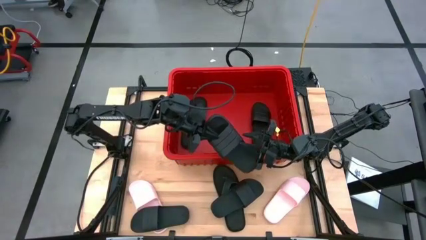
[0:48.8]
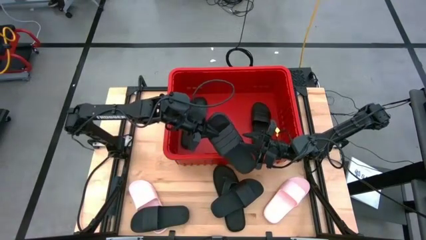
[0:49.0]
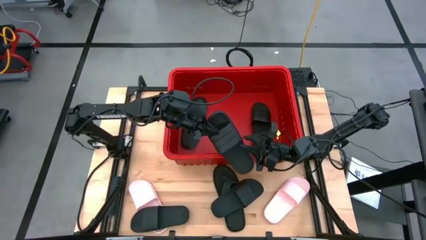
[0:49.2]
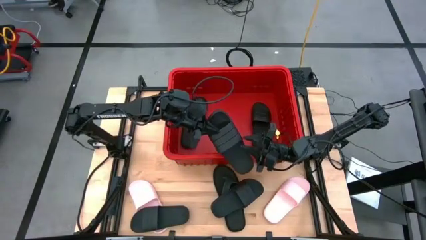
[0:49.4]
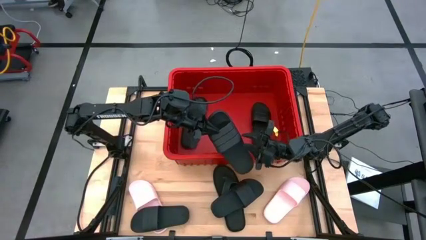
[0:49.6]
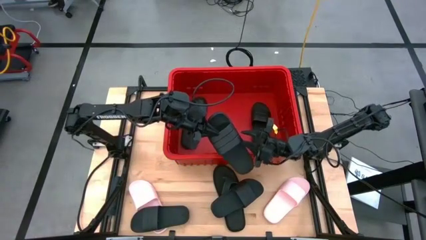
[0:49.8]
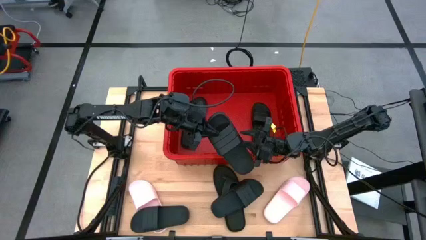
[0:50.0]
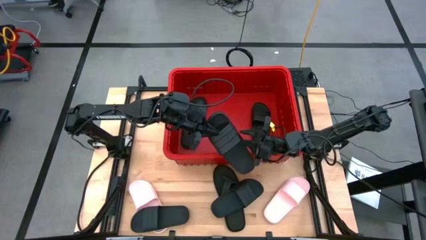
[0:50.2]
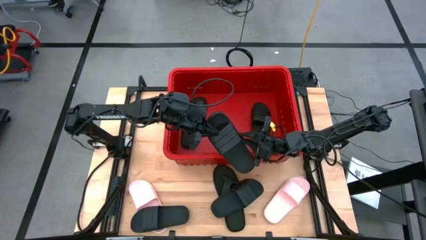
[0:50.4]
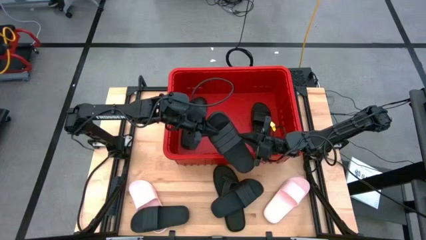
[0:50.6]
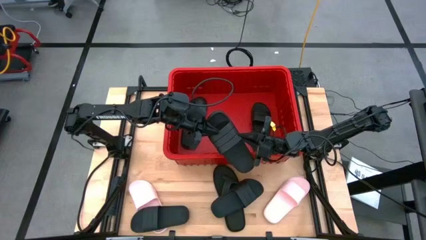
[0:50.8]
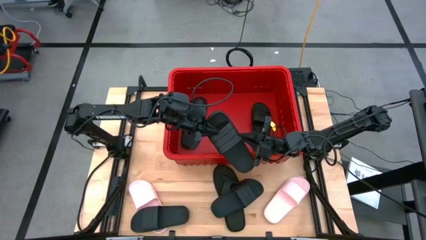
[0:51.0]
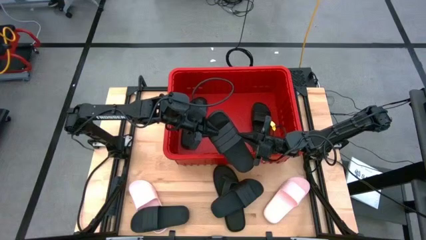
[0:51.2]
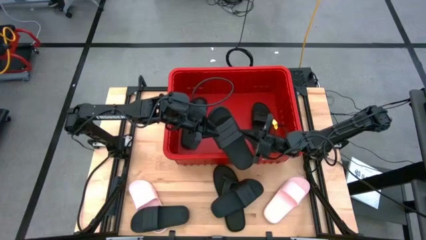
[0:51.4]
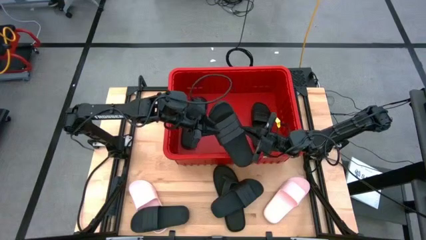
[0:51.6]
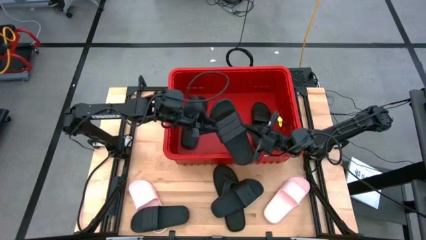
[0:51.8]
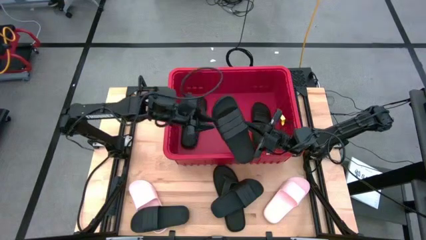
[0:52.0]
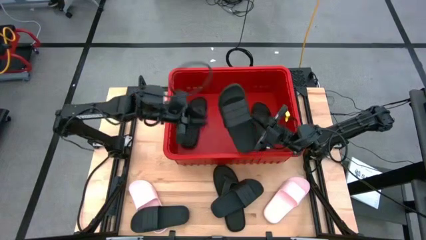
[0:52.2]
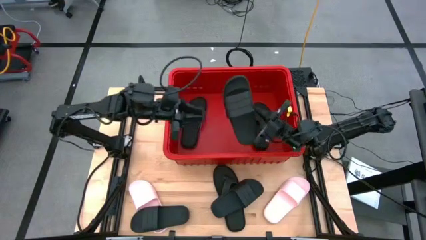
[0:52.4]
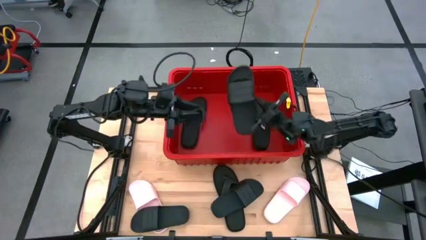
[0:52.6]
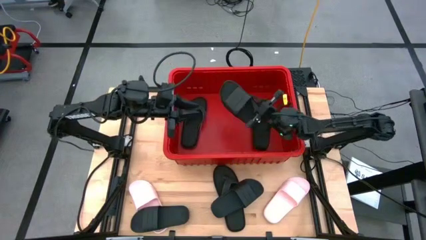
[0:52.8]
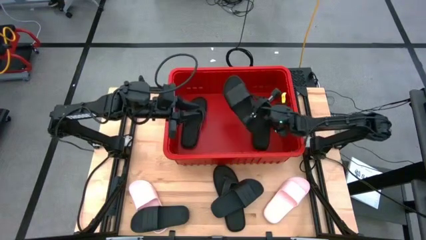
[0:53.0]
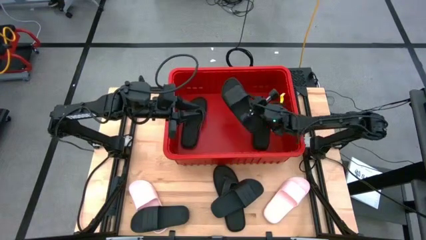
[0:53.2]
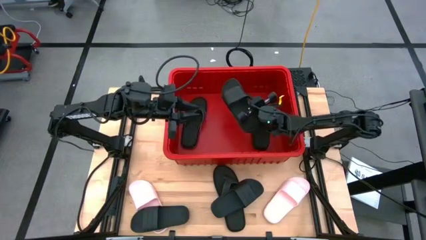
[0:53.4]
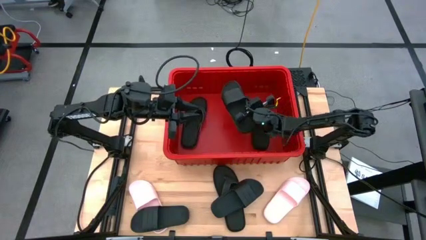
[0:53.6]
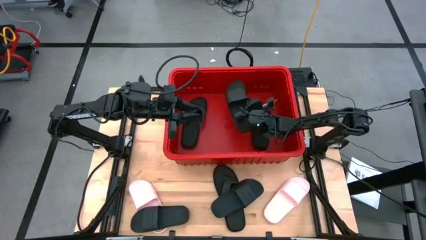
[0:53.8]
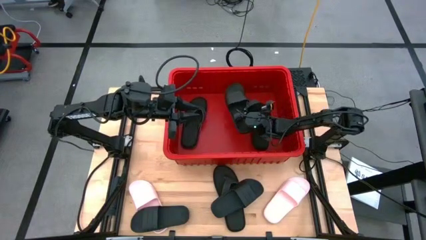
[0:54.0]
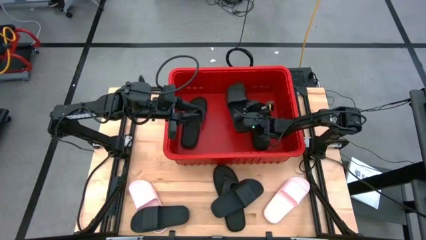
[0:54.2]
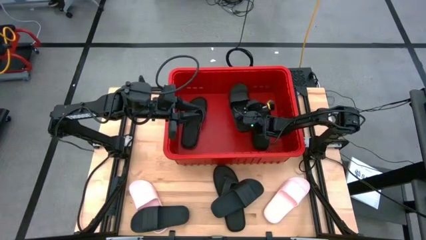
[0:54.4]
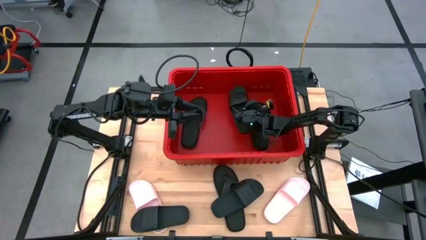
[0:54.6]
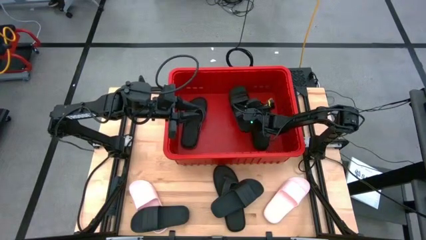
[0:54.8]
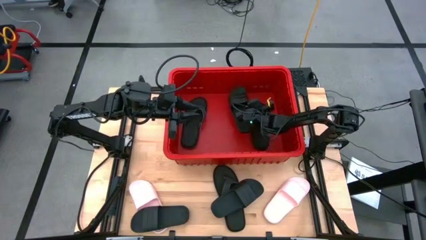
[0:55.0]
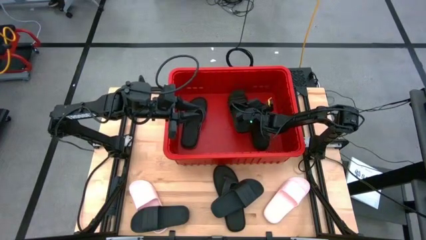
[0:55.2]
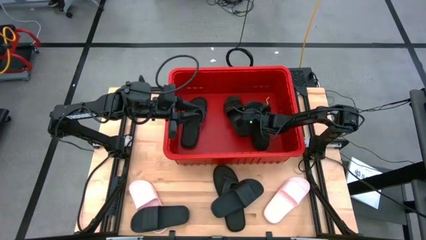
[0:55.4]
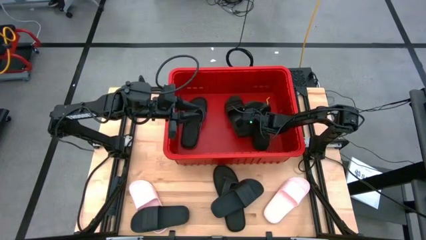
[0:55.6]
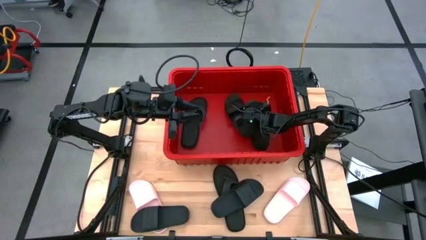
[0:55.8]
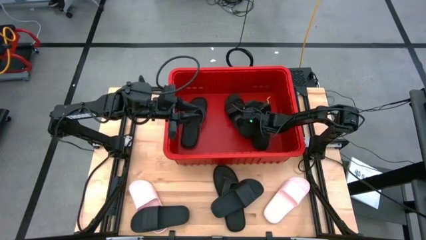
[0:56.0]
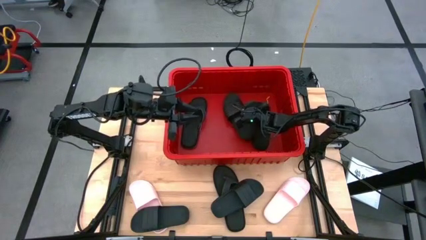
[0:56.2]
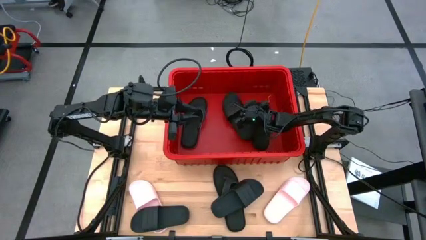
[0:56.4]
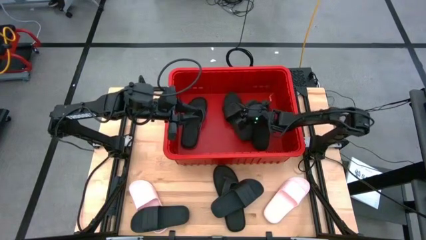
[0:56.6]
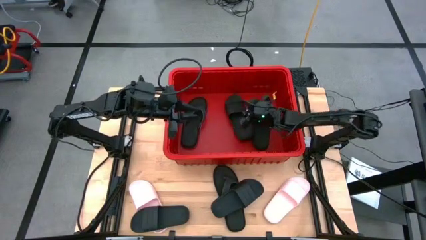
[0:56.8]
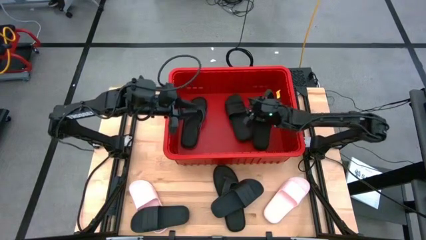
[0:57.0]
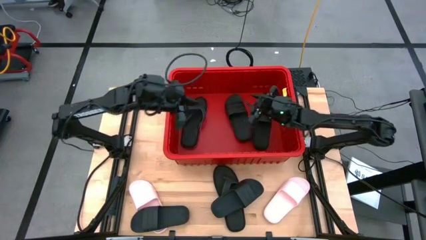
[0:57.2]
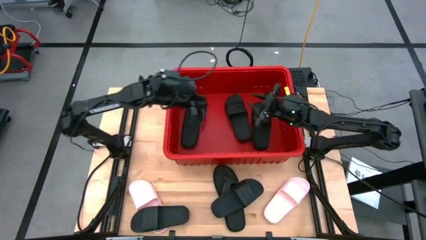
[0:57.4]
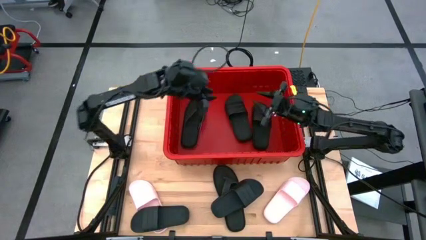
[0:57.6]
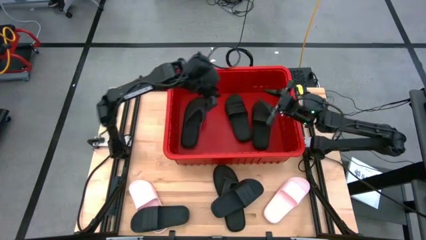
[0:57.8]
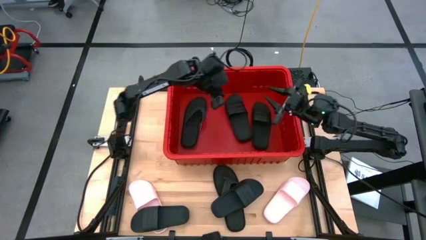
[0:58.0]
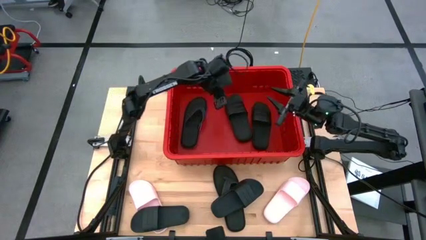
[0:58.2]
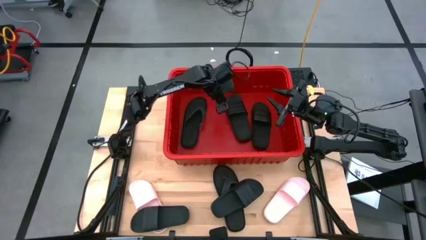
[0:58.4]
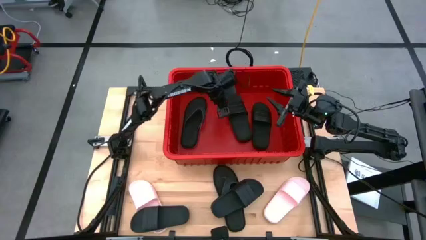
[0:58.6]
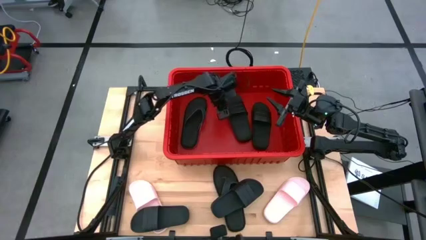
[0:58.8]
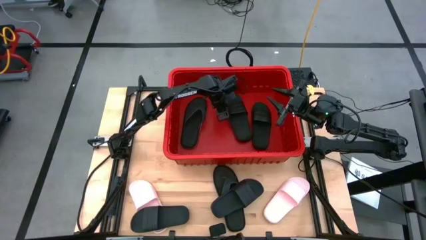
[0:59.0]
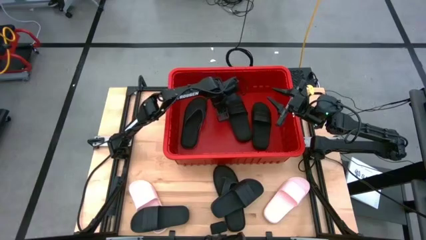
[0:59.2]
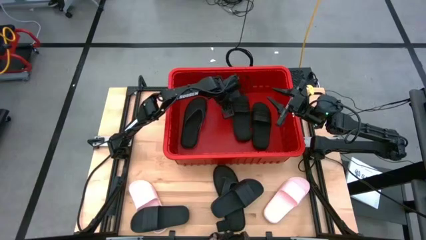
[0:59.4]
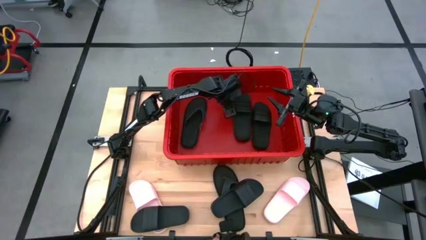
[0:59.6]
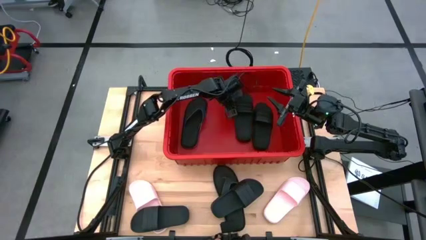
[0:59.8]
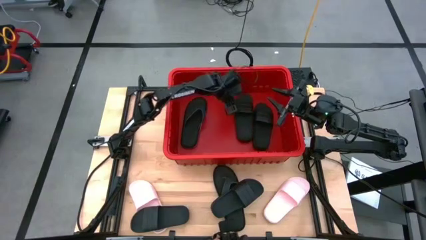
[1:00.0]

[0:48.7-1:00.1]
Task: Pick and place slides into bin
Put the black slide into the red bin

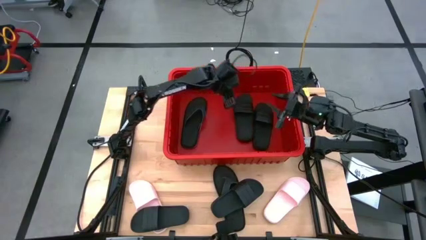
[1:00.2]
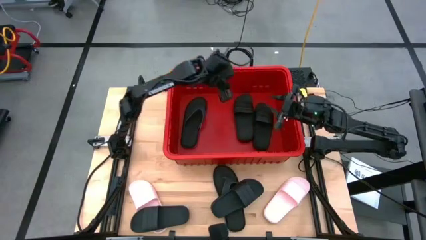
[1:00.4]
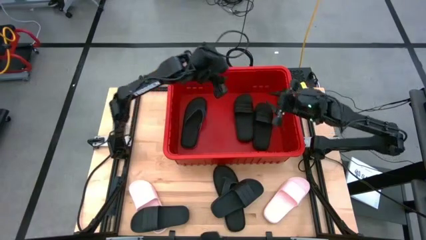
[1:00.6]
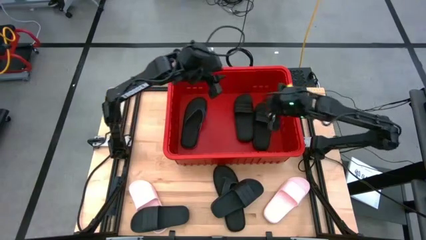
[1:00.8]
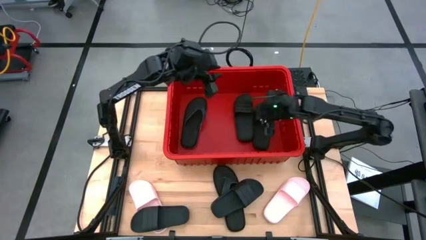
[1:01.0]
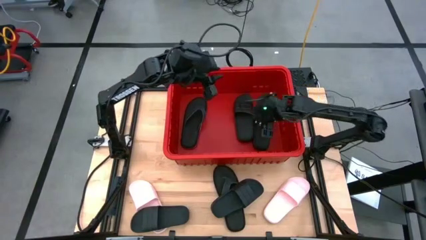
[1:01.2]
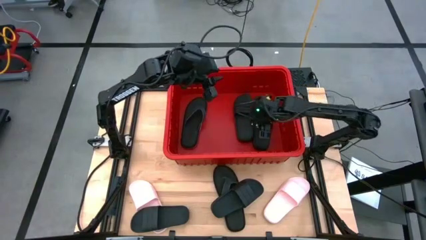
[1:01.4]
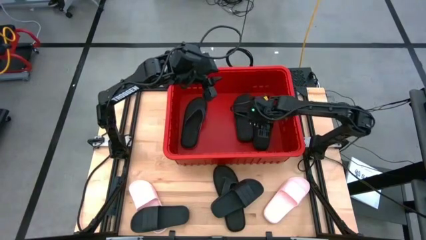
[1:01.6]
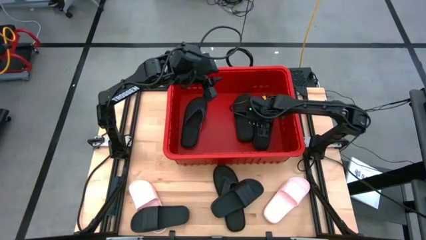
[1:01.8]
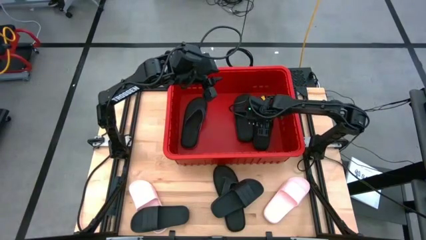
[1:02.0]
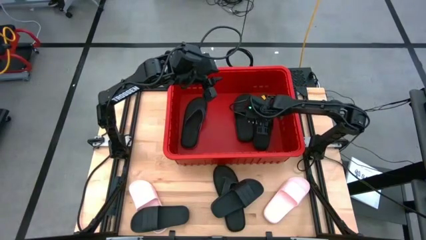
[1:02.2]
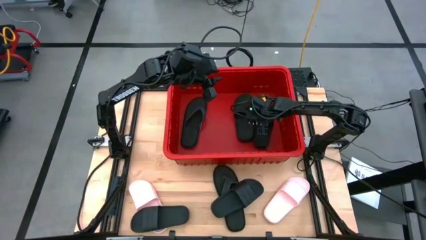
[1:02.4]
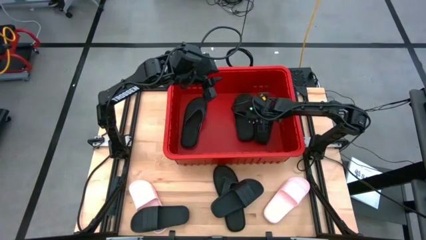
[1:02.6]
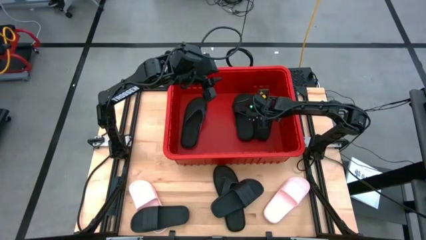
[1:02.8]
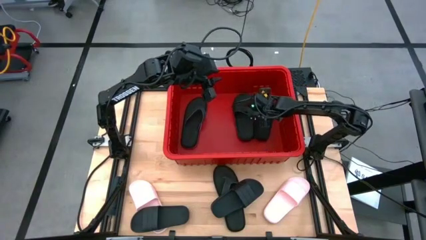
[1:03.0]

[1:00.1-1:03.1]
Adjust the black slide in the red bin

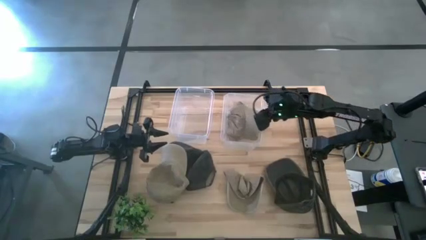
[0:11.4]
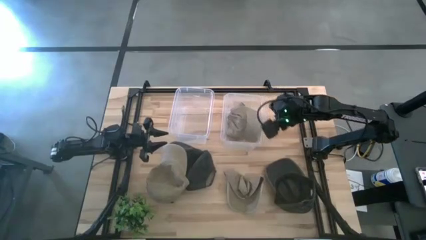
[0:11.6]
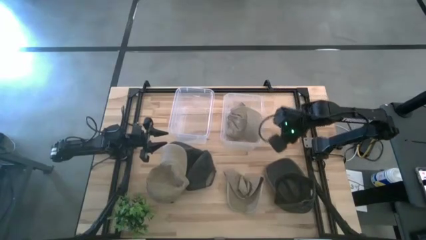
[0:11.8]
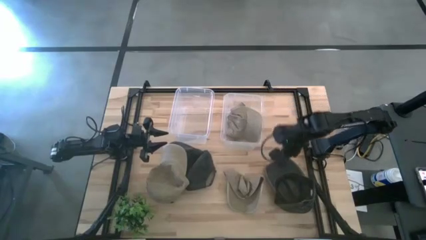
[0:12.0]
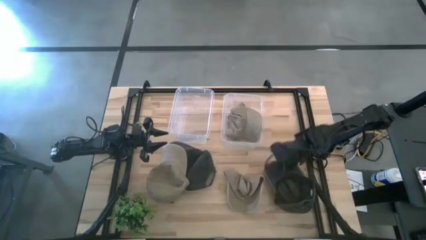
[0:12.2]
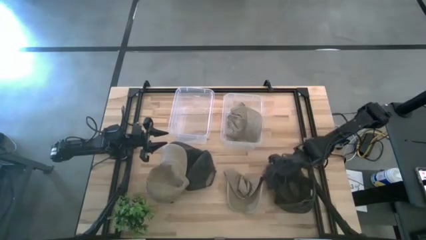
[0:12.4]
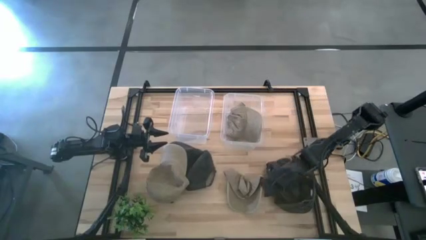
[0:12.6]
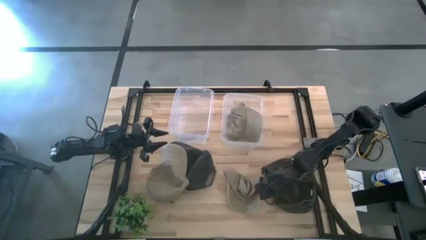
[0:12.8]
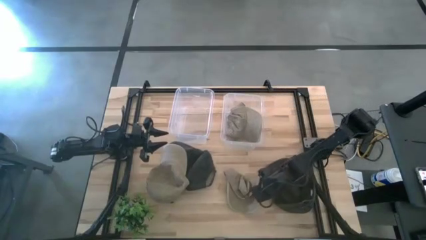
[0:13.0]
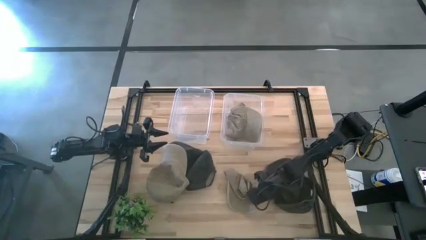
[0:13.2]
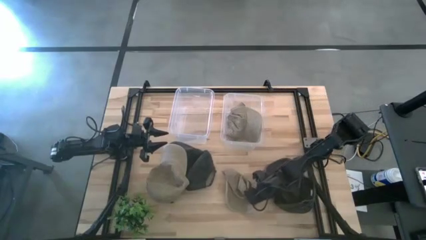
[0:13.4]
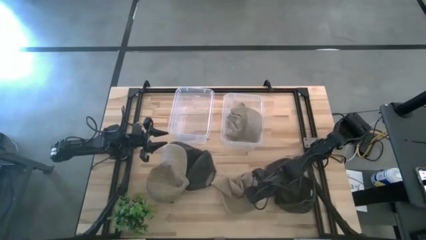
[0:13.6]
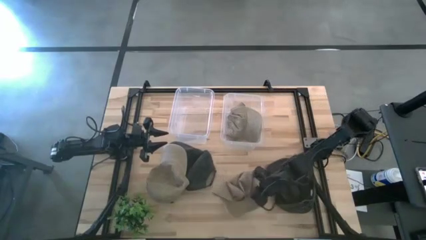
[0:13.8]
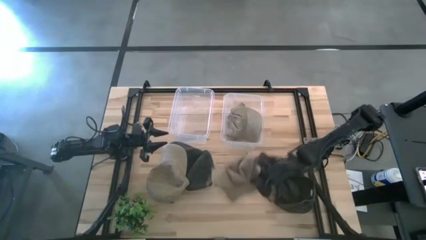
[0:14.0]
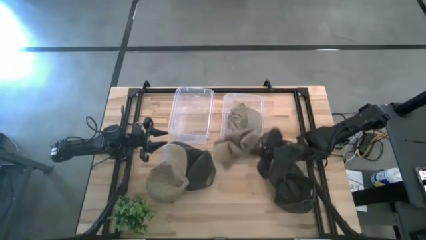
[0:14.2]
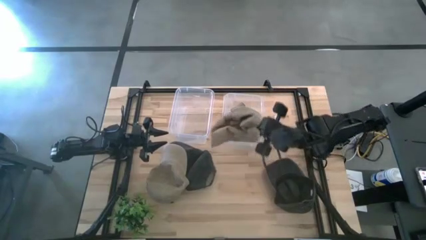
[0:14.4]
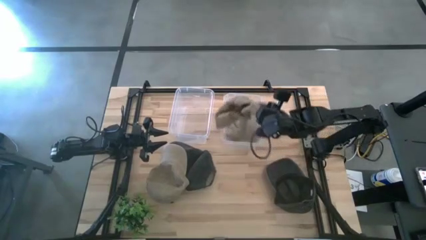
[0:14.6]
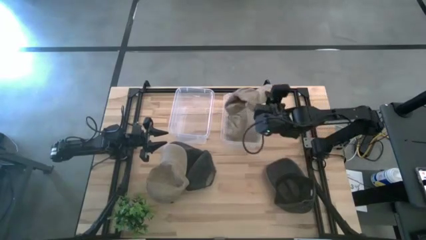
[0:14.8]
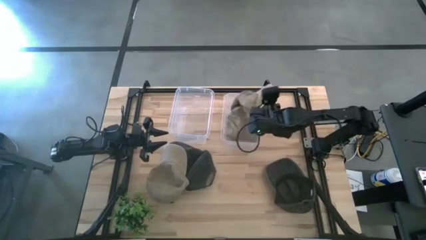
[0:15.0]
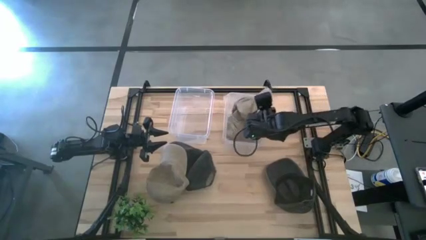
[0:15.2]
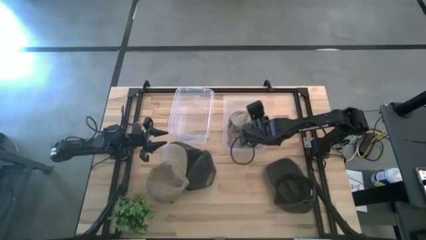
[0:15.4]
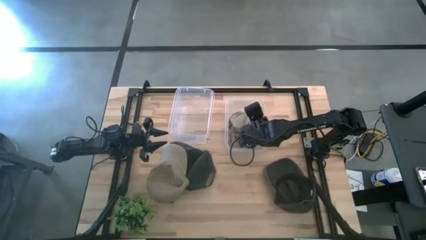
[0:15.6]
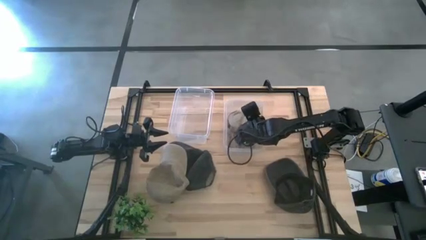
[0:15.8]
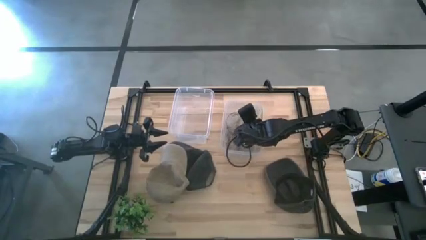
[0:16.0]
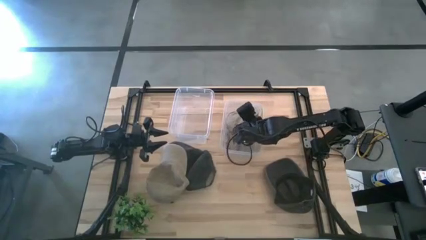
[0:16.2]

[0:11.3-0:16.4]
Task: Pick & Place hat
Put the right brown cap into the right transparent bin
